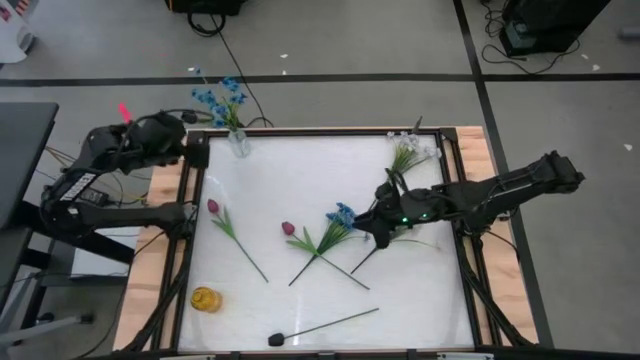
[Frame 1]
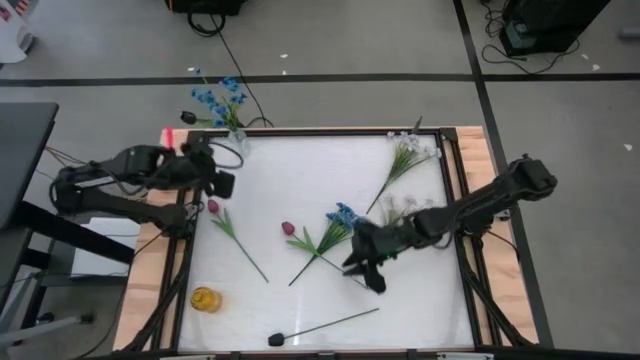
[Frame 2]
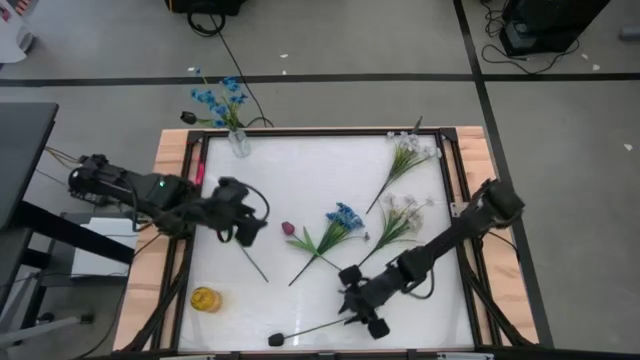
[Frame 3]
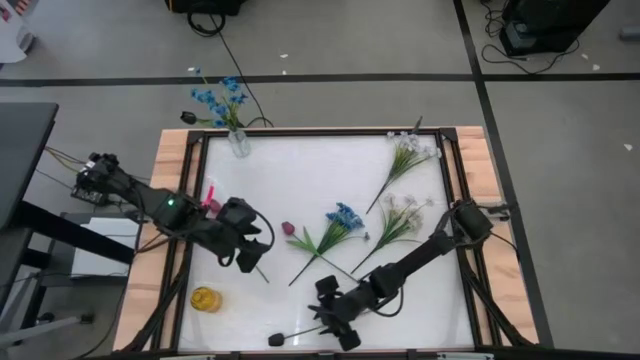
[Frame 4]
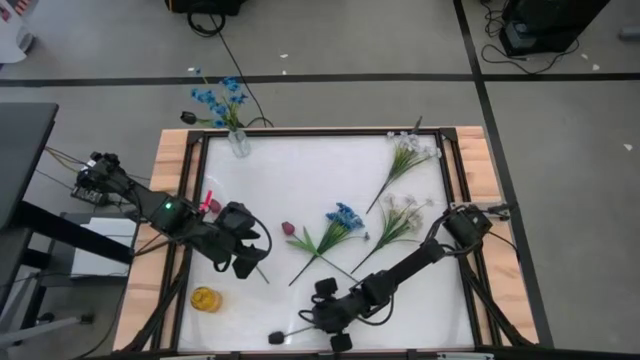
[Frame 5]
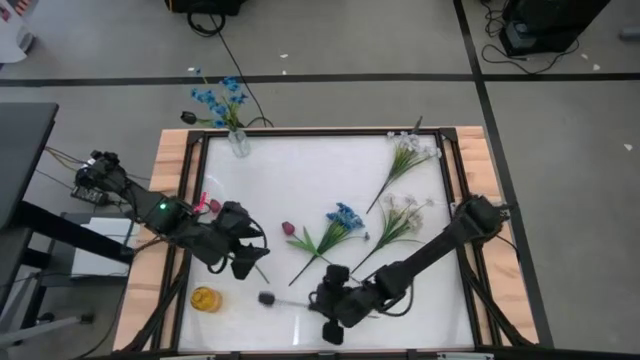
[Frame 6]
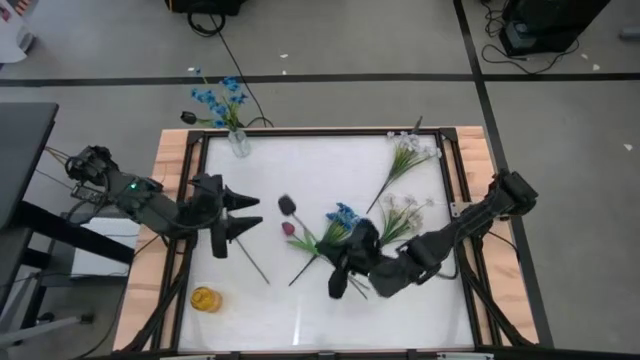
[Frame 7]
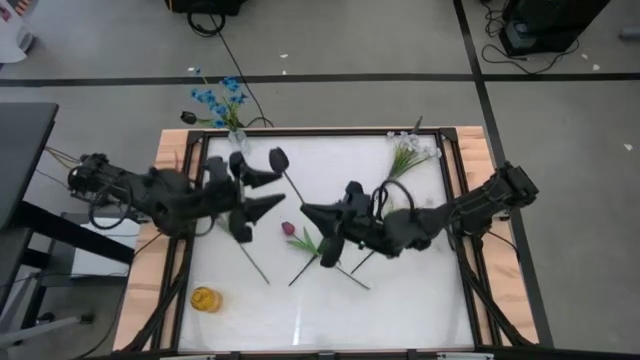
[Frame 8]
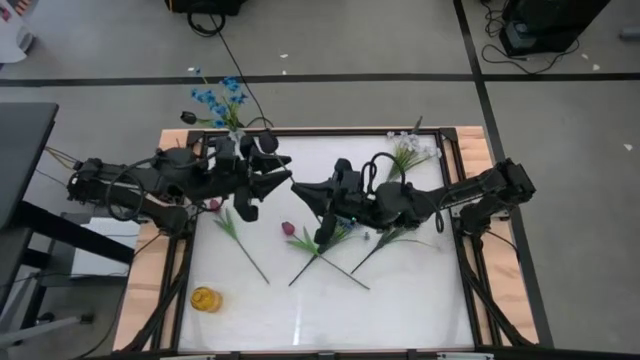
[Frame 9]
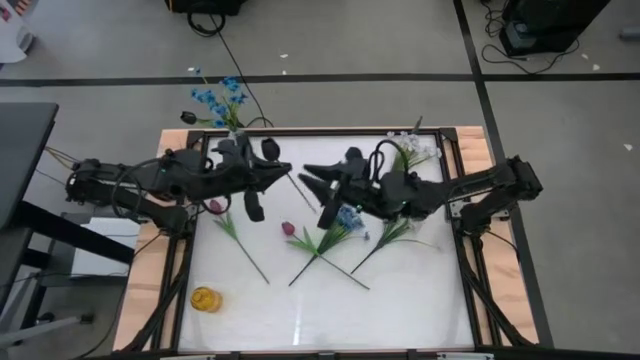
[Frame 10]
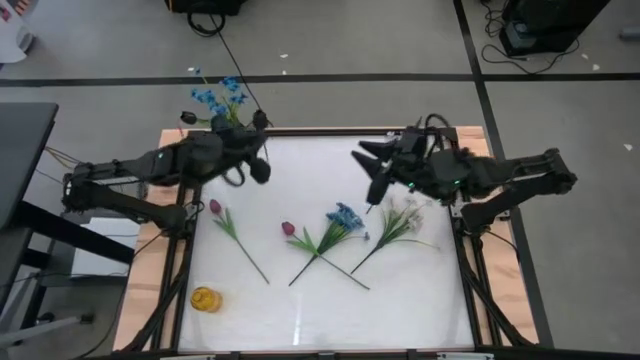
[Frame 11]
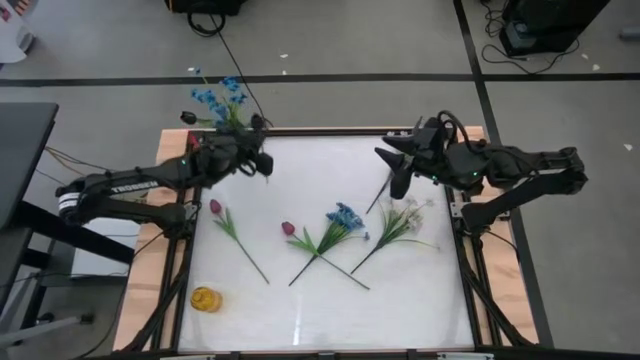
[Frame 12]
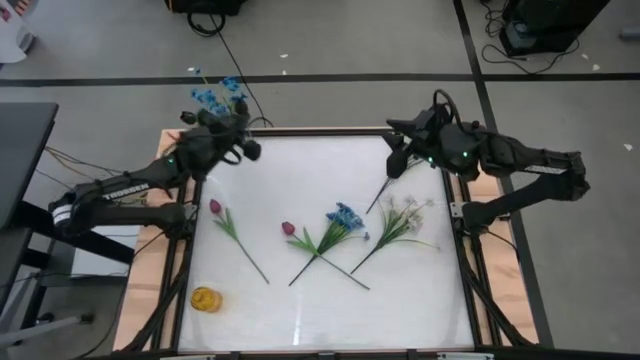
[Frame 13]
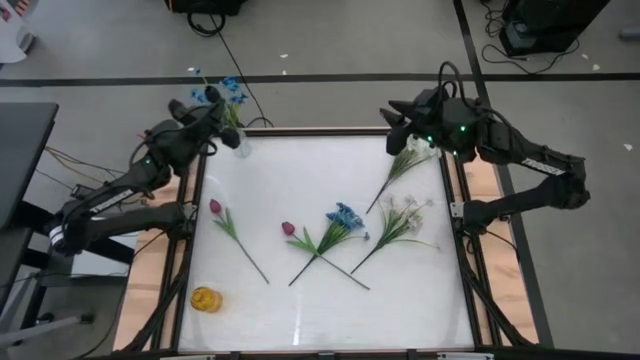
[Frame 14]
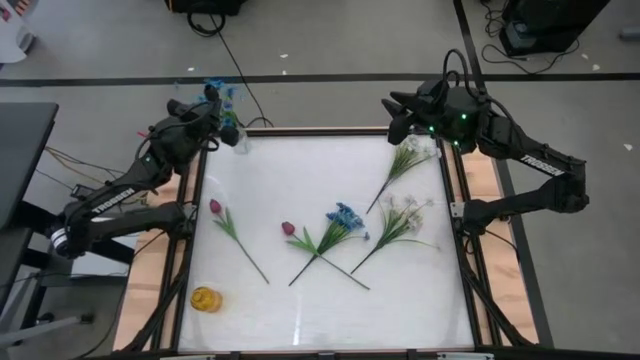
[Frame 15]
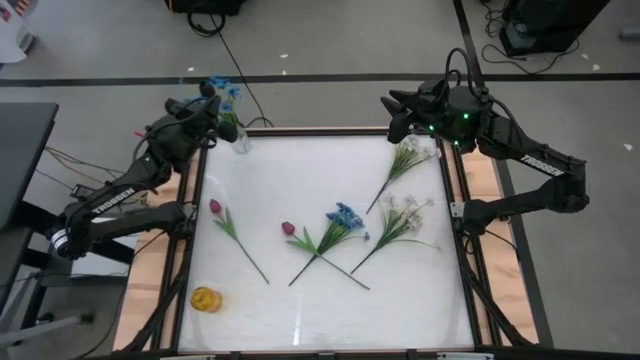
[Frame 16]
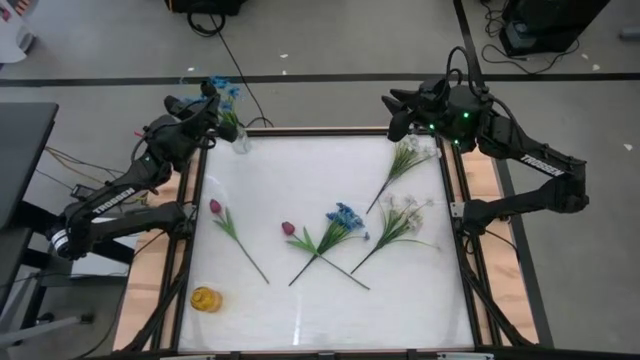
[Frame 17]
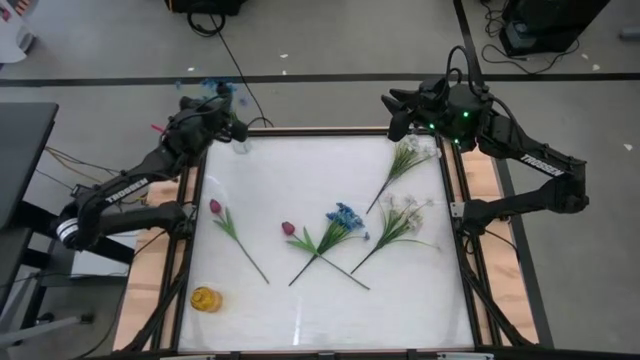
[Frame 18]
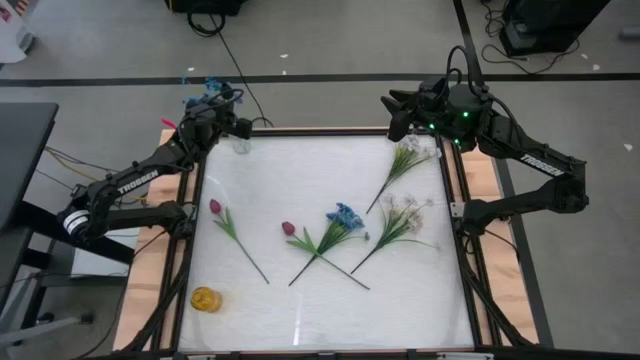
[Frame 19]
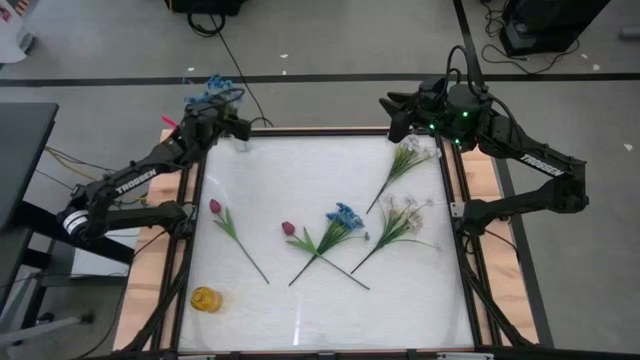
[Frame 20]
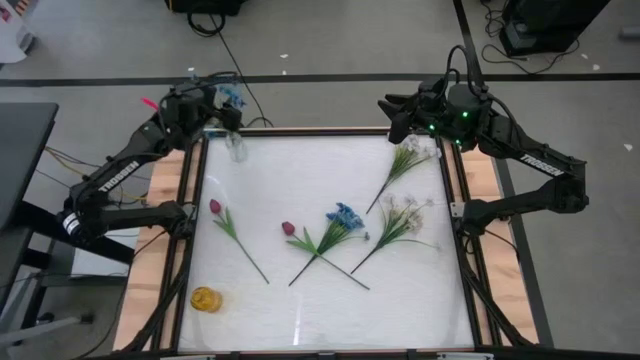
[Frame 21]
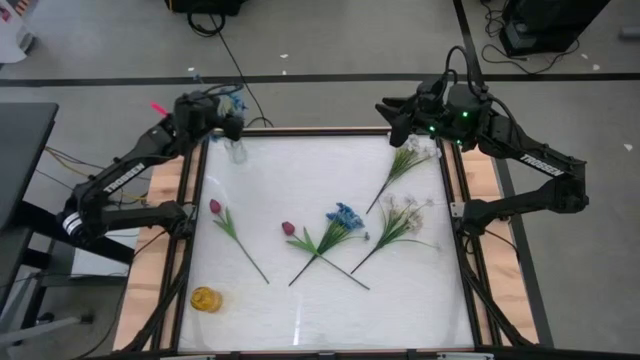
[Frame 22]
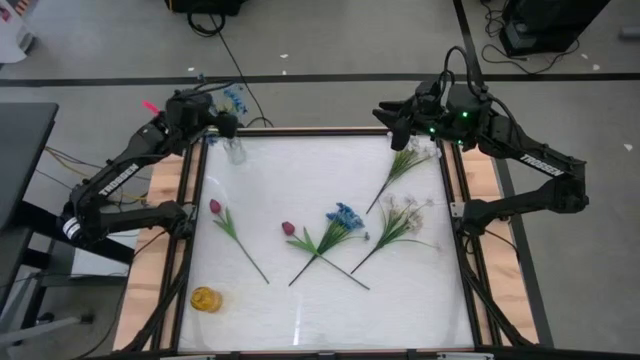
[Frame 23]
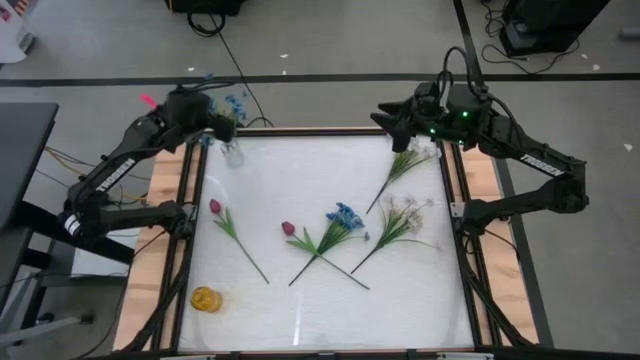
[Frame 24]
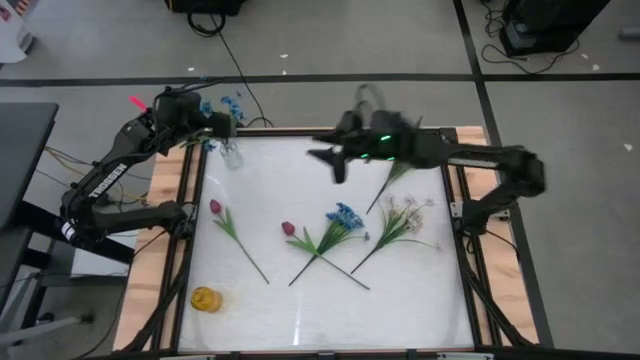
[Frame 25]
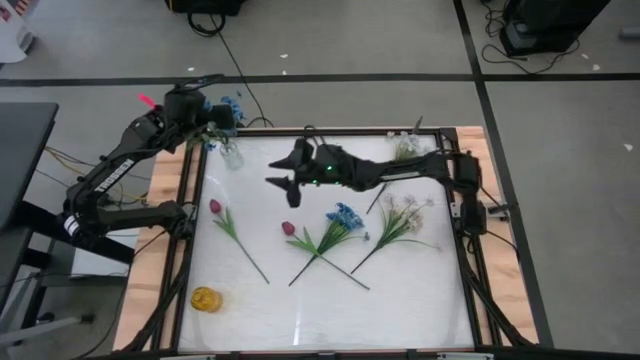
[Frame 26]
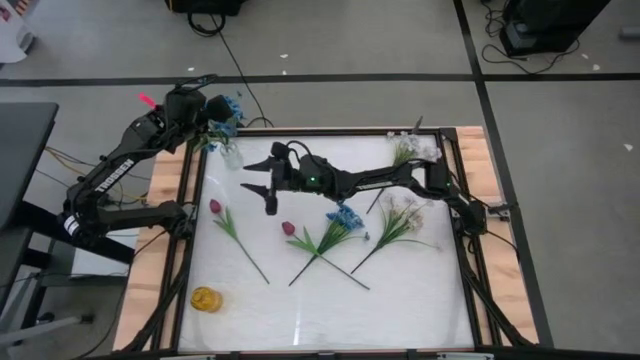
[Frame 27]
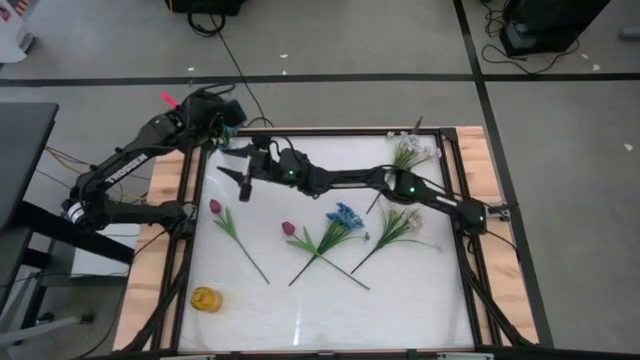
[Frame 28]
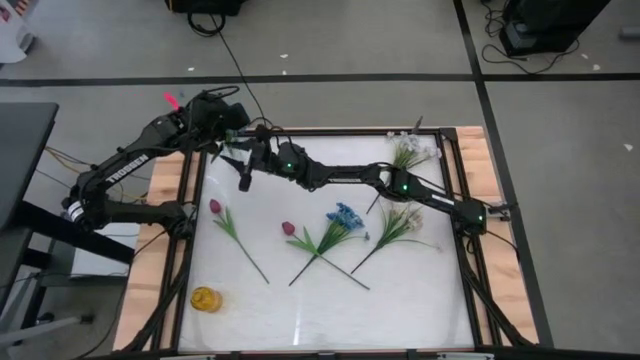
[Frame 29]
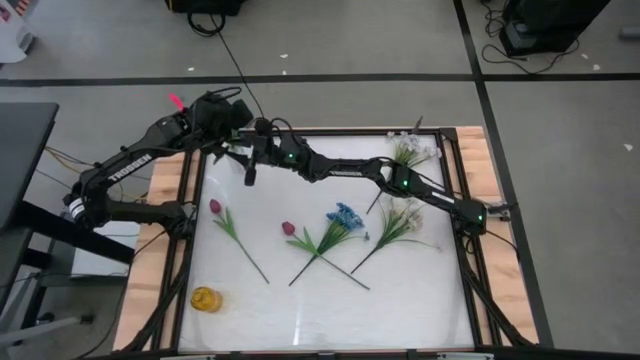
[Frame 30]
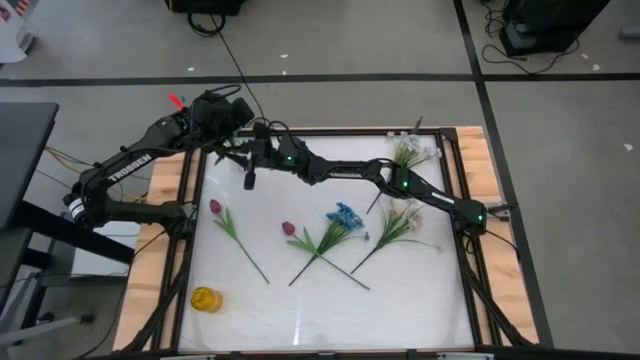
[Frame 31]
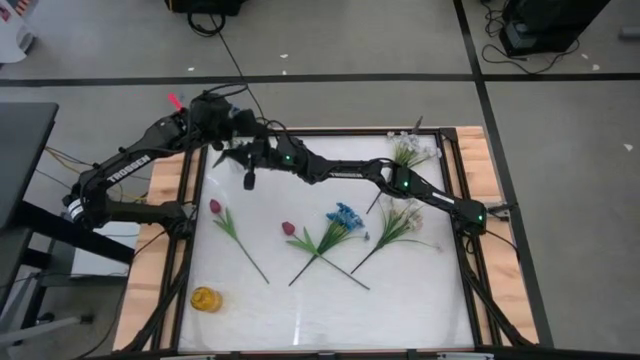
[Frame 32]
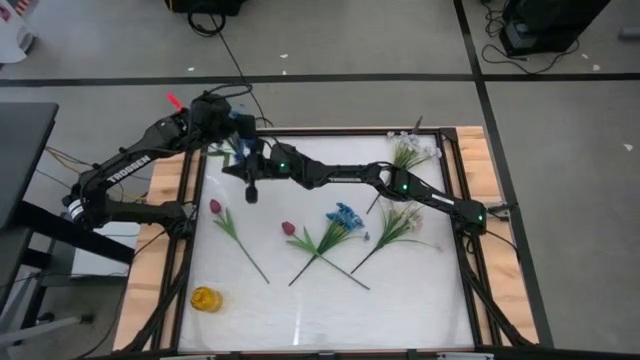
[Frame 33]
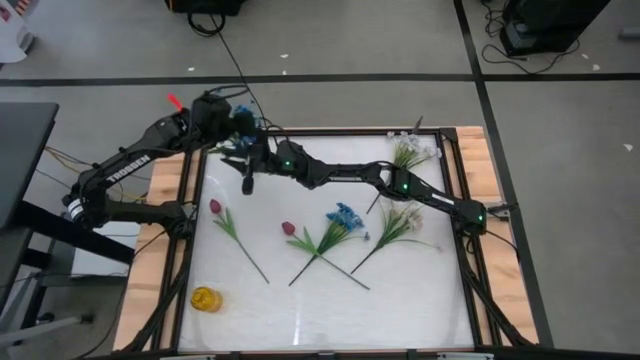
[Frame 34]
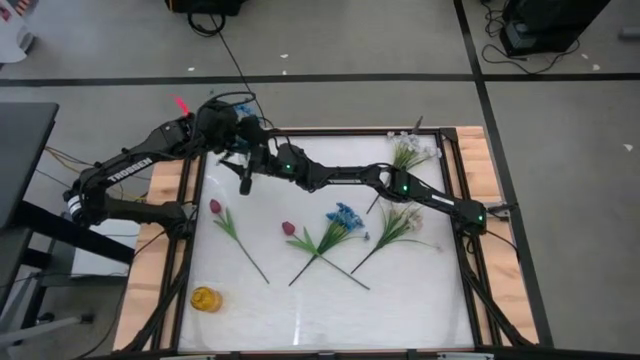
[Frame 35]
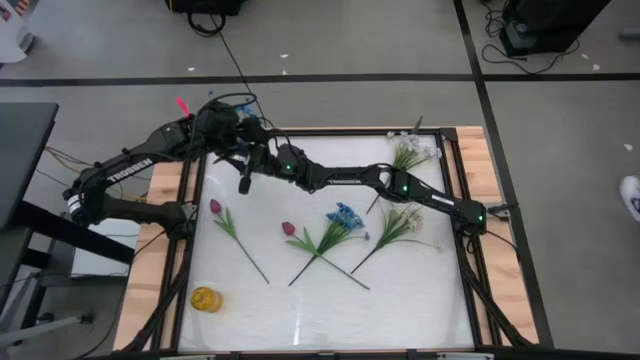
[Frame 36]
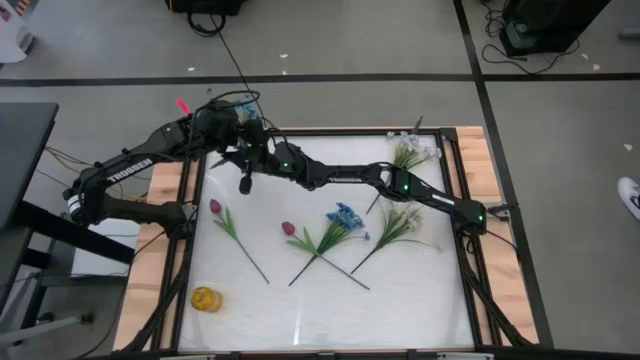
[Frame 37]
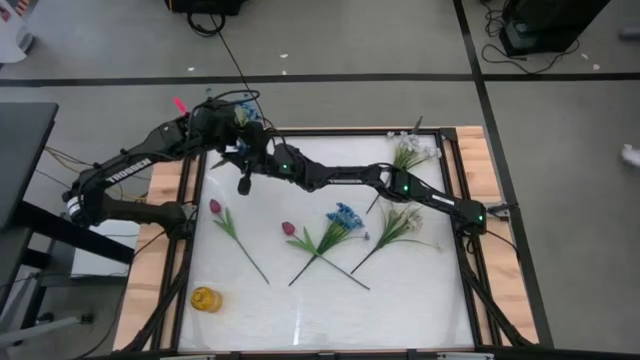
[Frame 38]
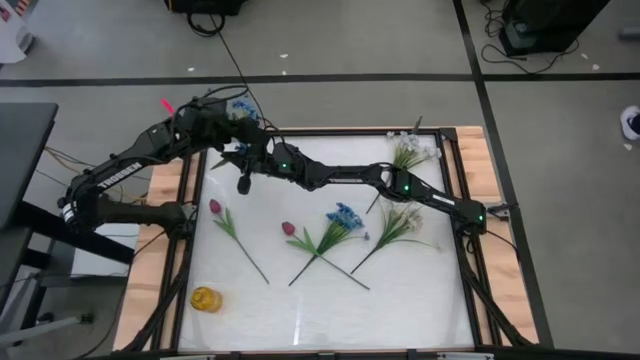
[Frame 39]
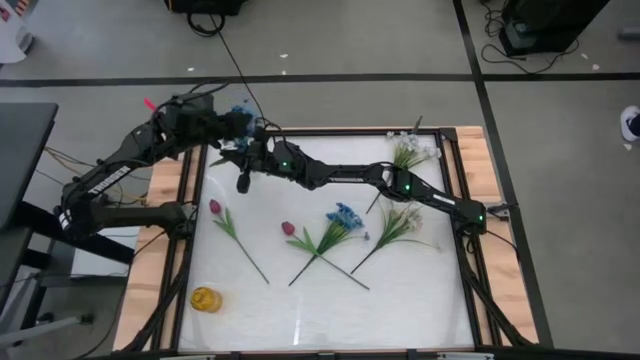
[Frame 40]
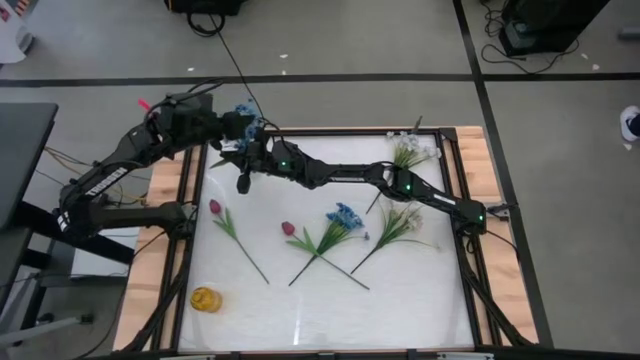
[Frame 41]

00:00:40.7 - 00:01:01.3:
Task: Sort flowers into vase by color
Put the black tulip into the transparent vase
